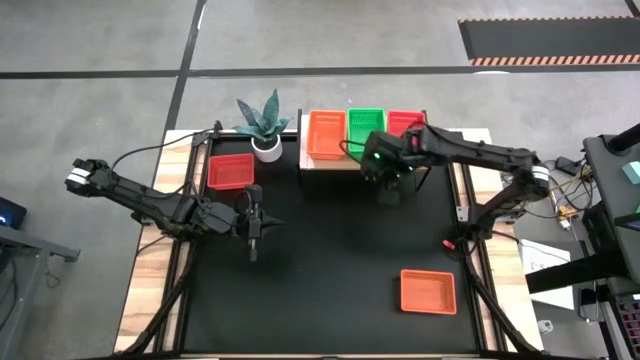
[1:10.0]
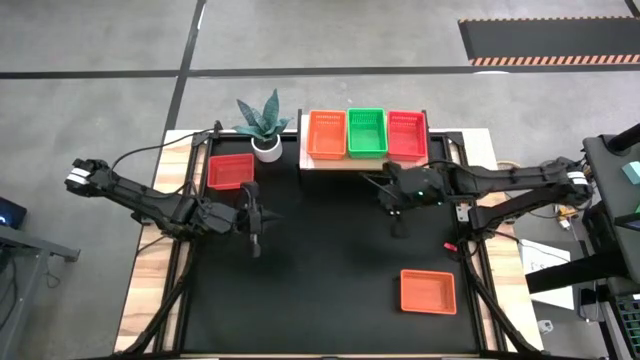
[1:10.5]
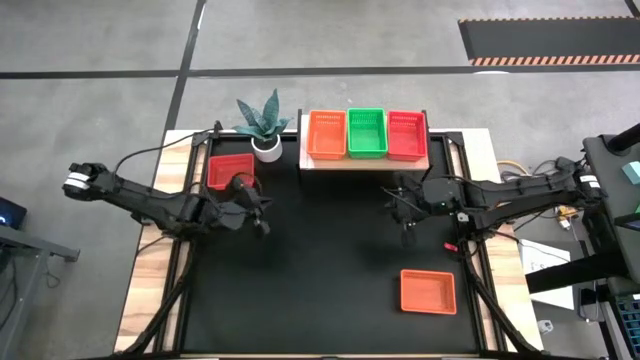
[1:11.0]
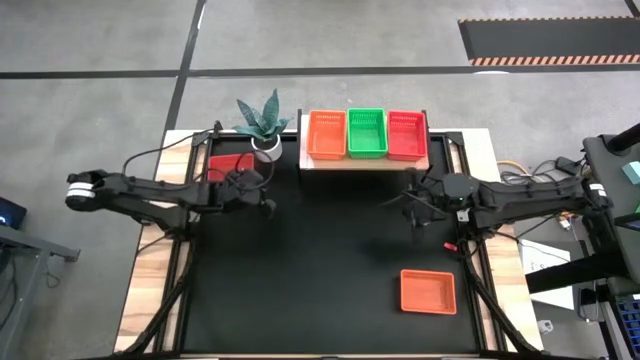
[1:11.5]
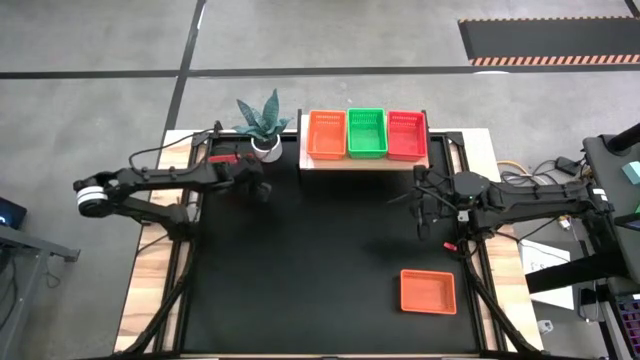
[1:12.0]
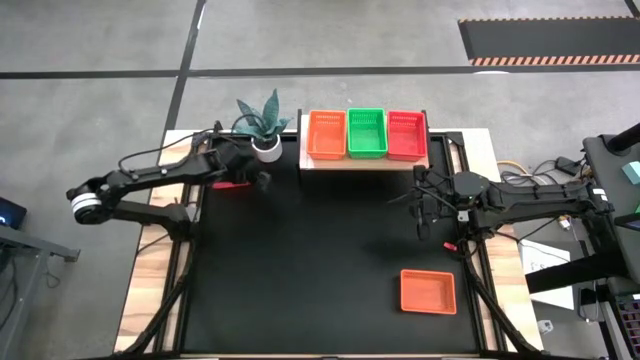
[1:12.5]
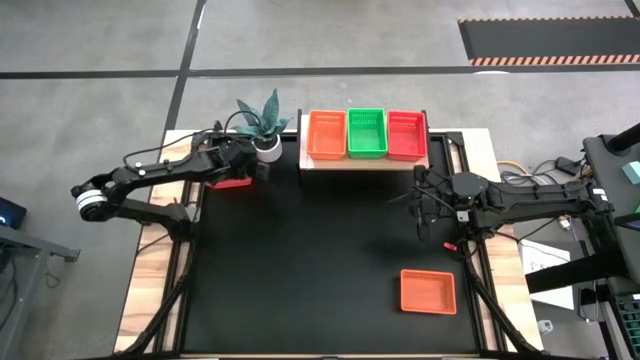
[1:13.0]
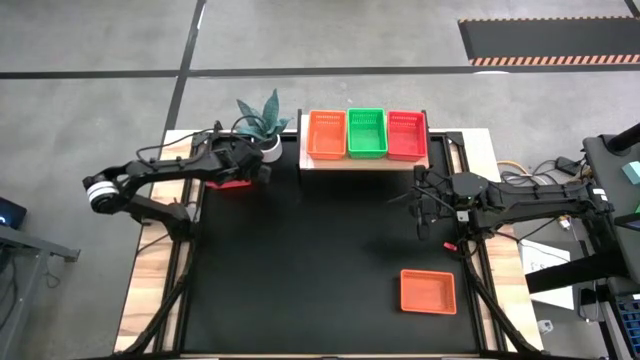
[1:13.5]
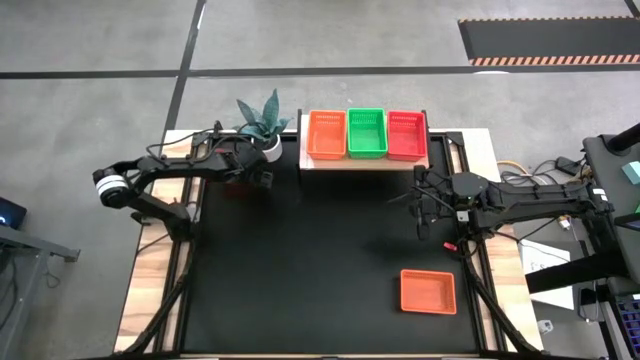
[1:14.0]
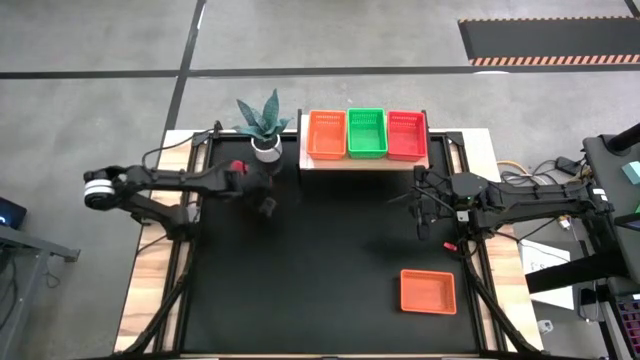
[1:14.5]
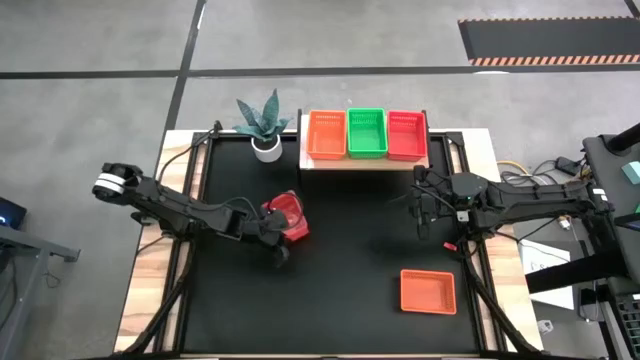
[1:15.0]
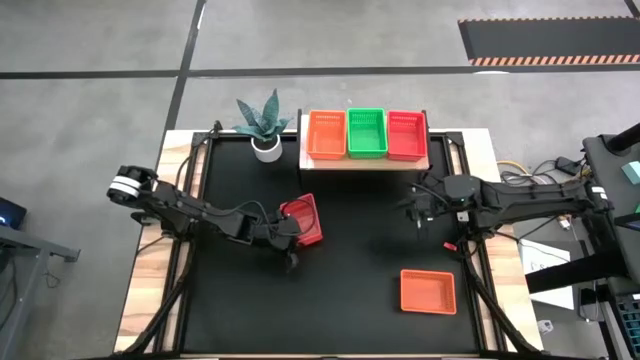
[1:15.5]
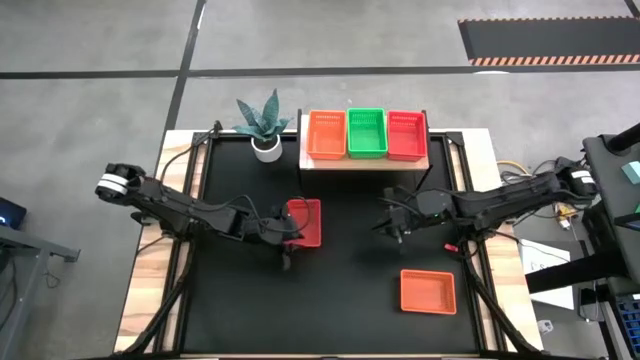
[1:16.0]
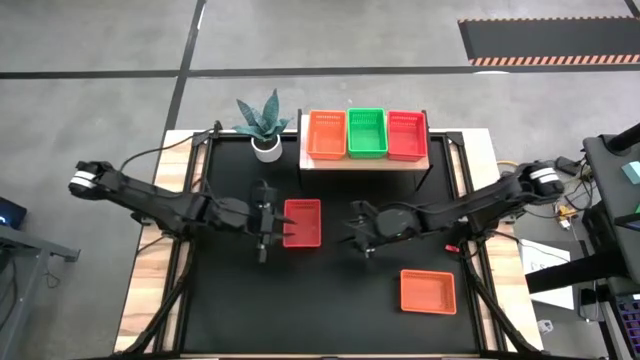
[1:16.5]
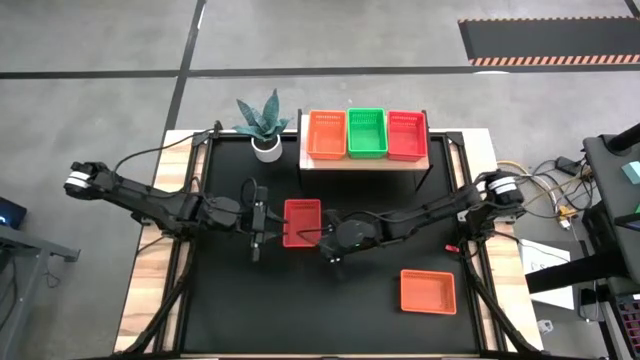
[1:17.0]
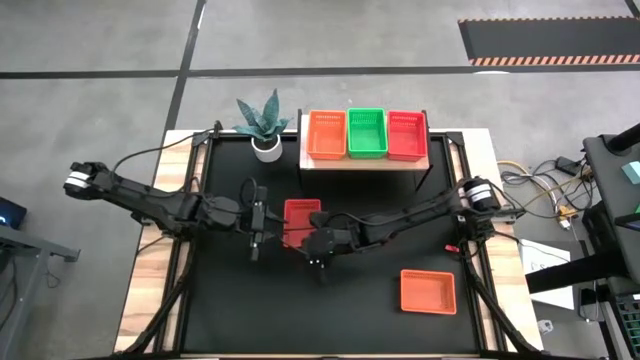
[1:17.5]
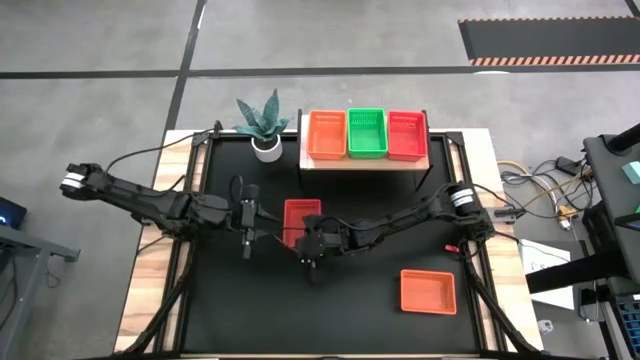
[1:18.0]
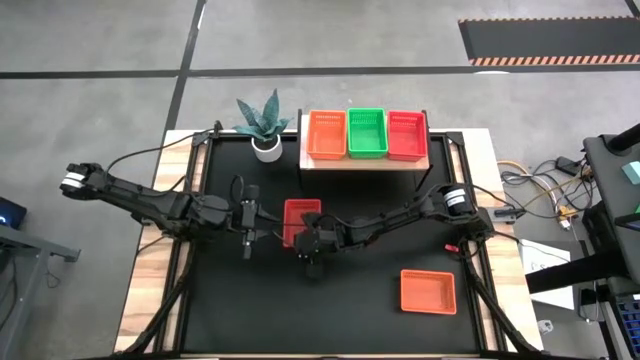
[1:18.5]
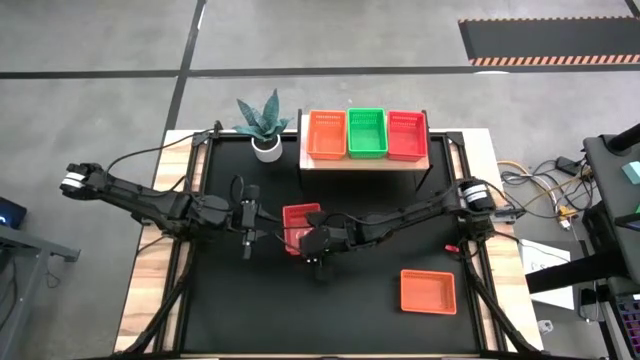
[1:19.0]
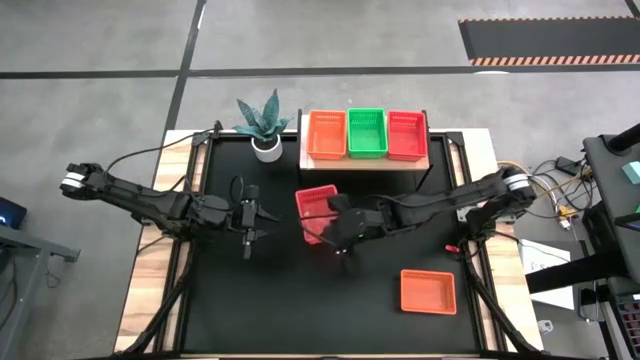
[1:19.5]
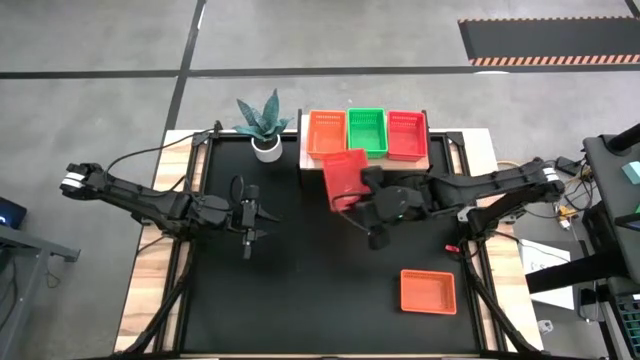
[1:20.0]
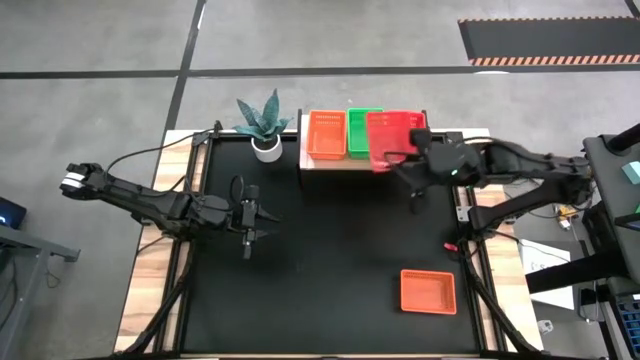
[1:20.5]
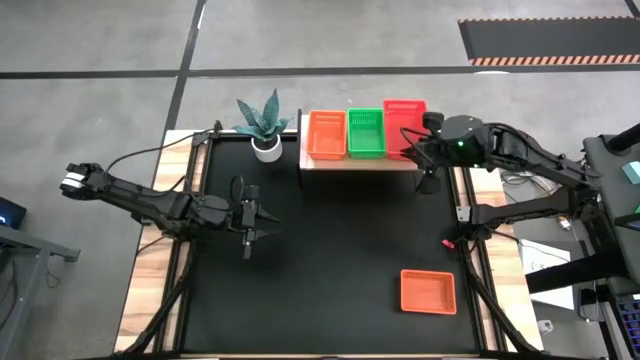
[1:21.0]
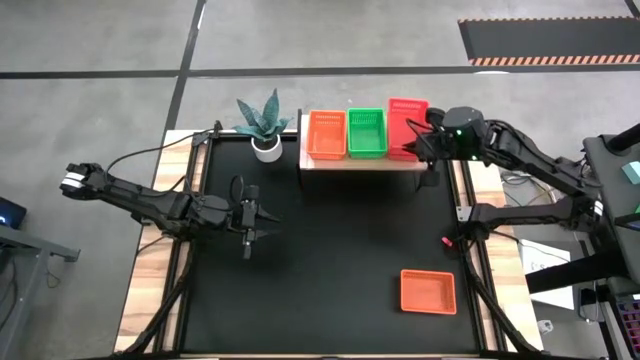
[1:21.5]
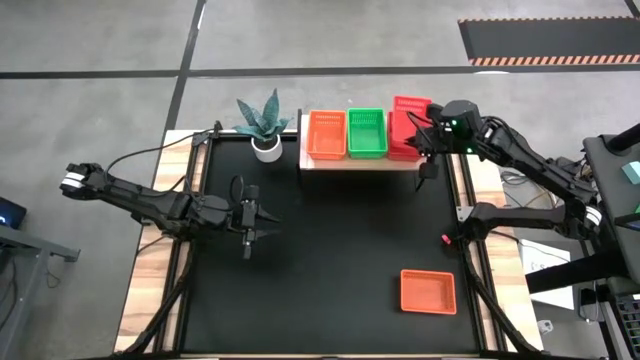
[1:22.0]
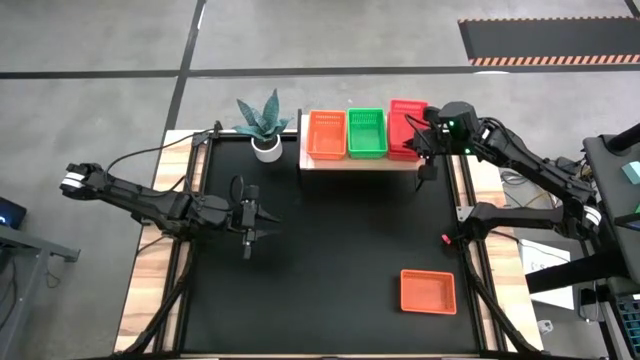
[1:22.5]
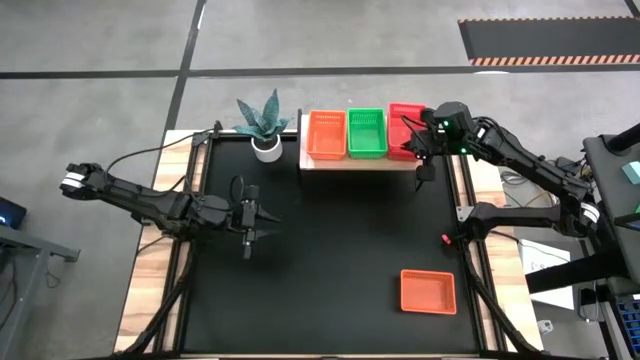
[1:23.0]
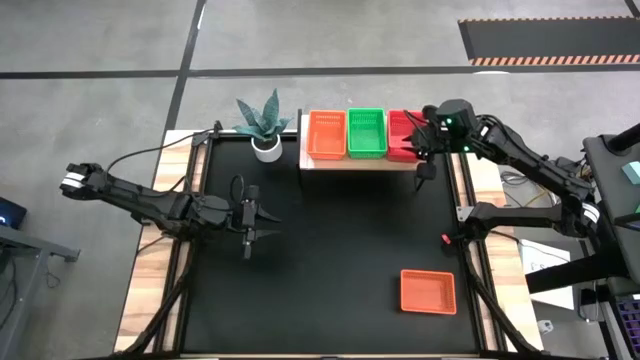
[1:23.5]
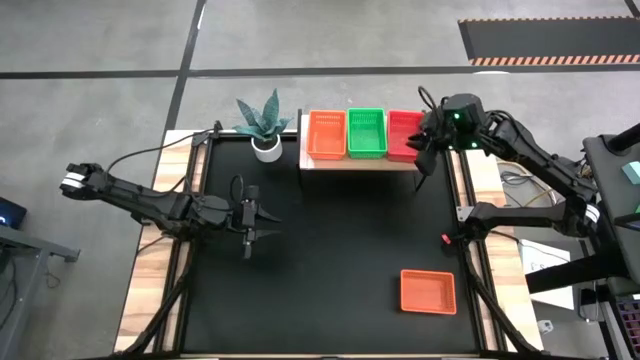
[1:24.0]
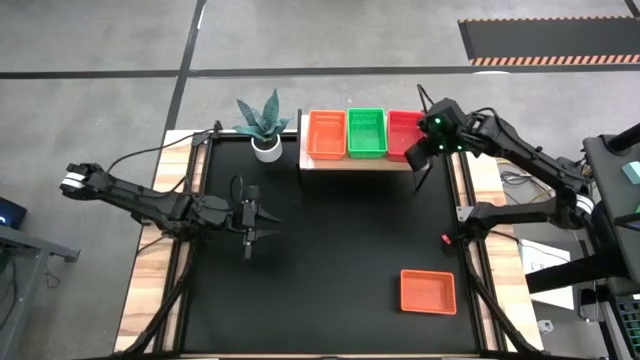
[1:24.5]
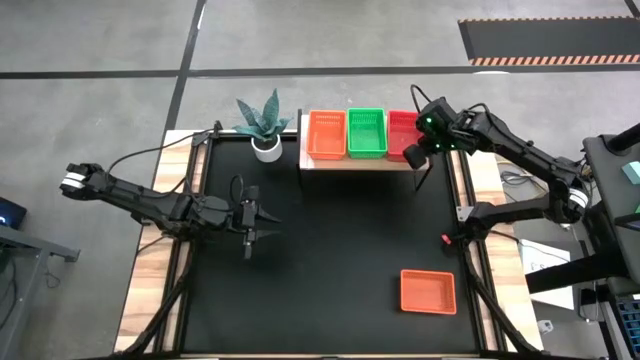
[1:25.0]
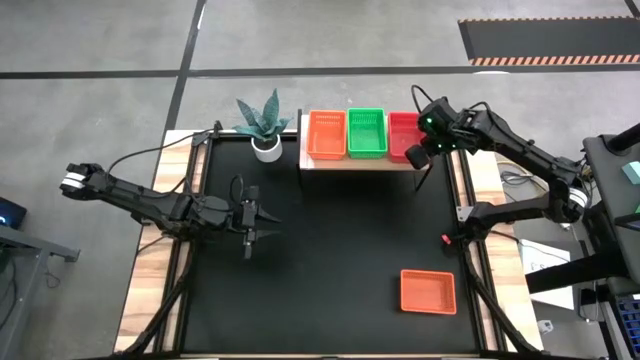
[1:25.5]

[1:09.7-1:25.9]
Task: Stack baskets on shelf by color
Stack the red bin on top of the red bins on the shelf

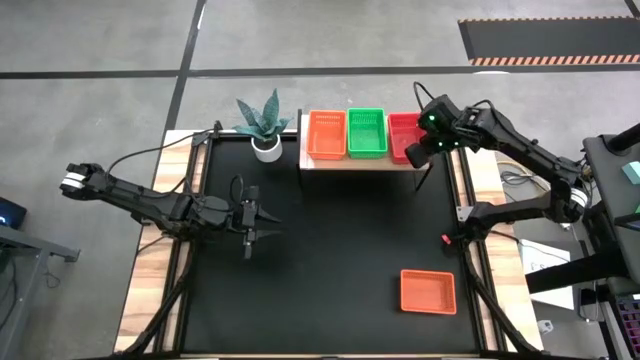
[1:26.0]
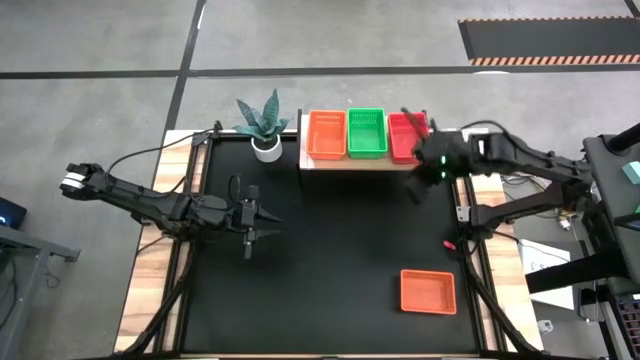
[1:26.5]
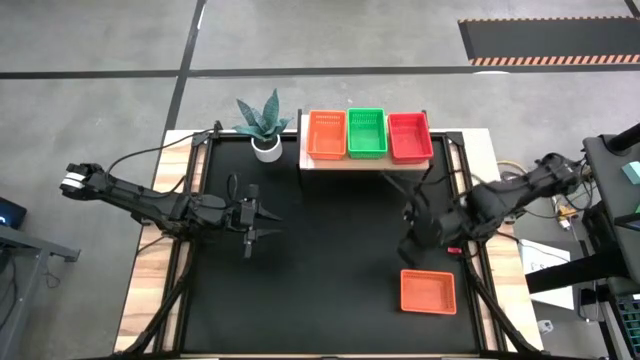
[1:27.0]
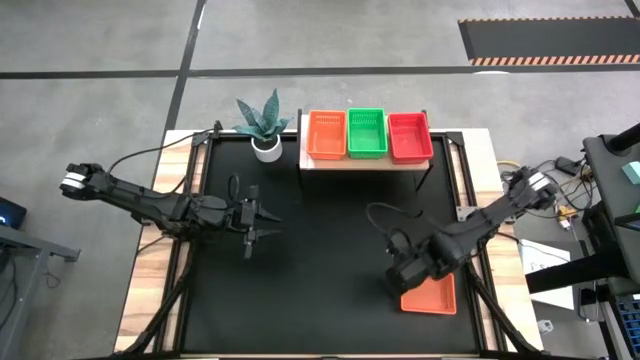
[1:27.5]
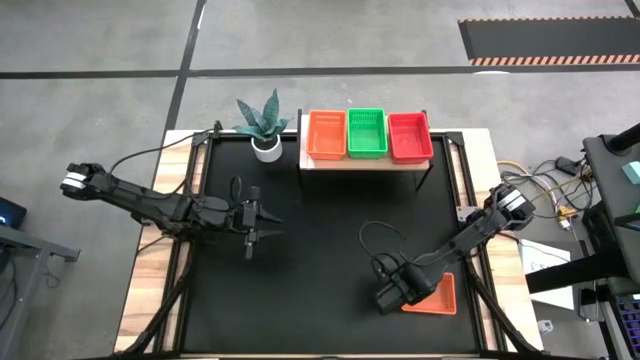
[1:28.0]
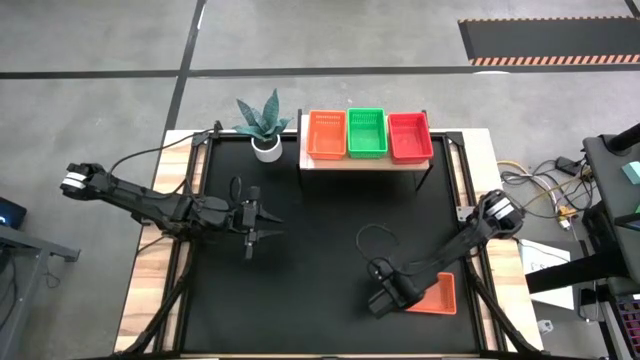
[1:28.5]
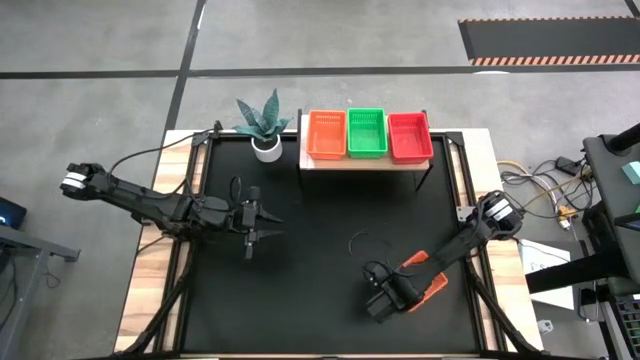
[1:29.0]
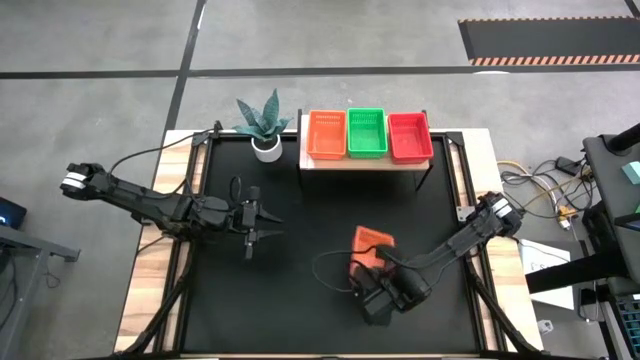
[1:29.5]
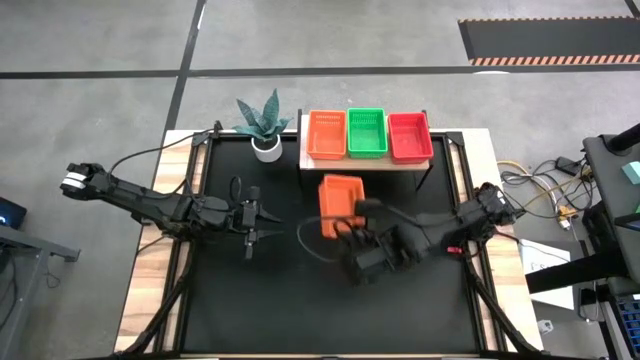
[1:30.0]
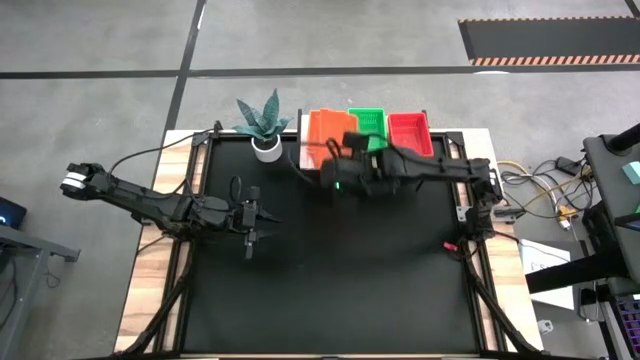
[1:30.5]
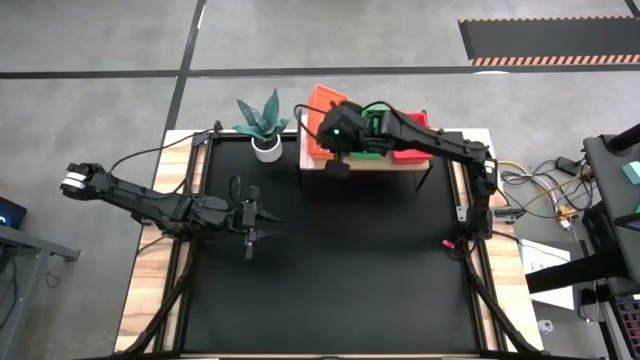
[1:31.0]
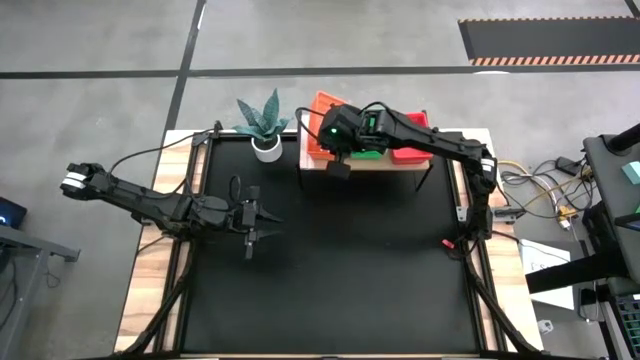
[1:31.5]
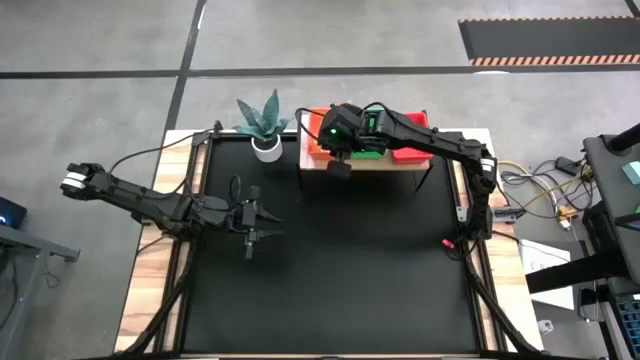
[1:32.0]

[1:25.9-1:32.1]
Stack the orange bin on top of the orange bins on the shelf
